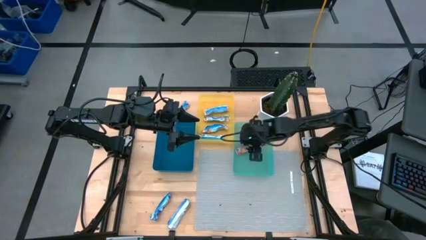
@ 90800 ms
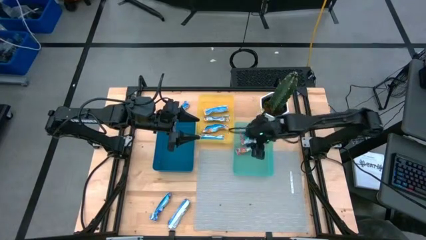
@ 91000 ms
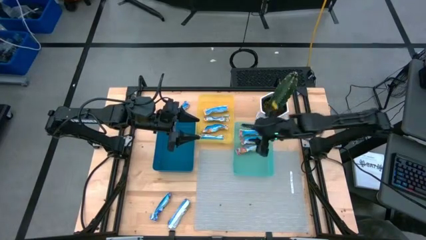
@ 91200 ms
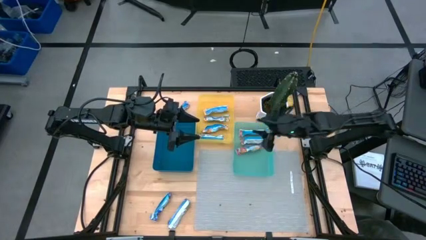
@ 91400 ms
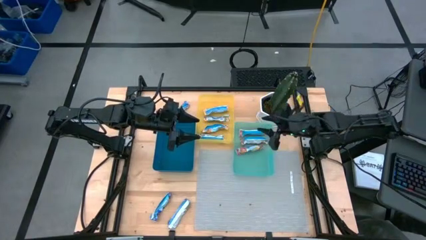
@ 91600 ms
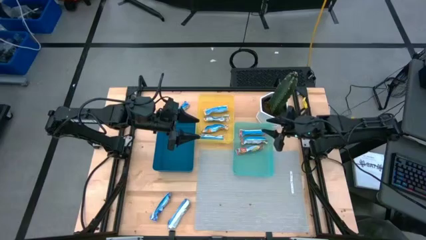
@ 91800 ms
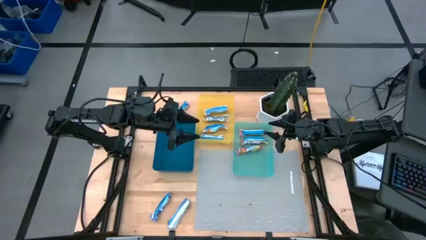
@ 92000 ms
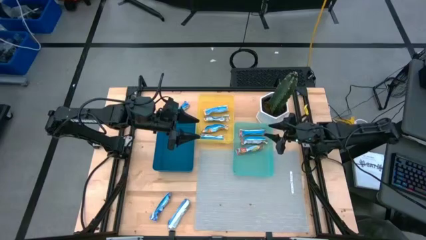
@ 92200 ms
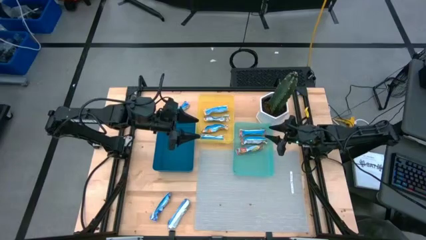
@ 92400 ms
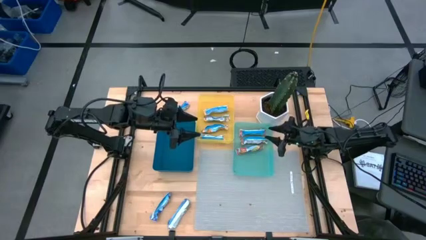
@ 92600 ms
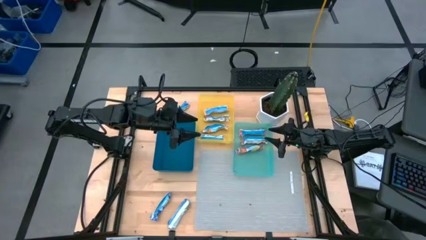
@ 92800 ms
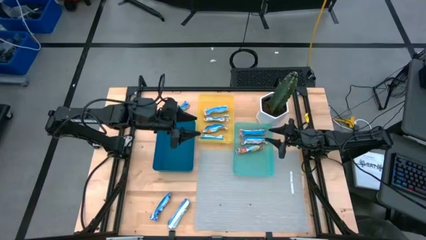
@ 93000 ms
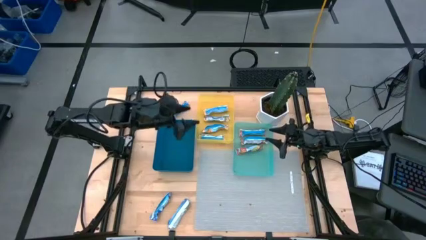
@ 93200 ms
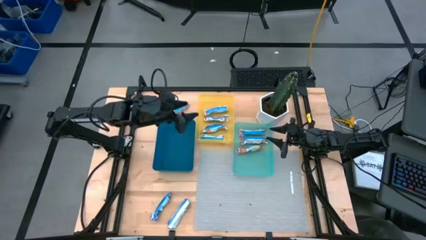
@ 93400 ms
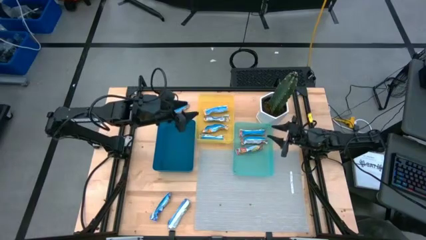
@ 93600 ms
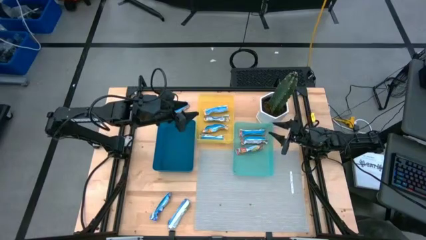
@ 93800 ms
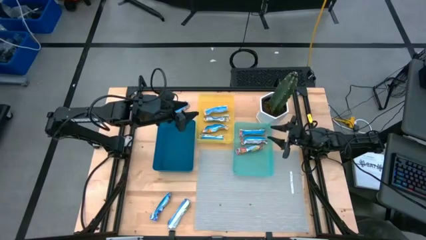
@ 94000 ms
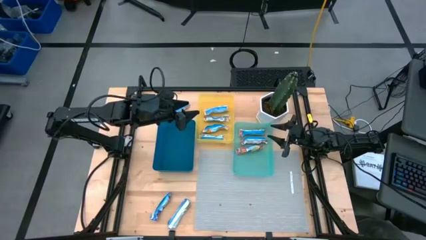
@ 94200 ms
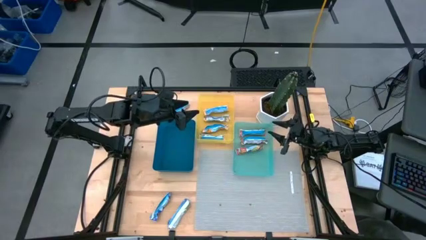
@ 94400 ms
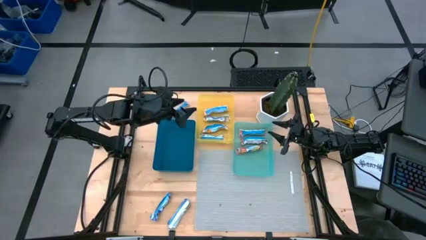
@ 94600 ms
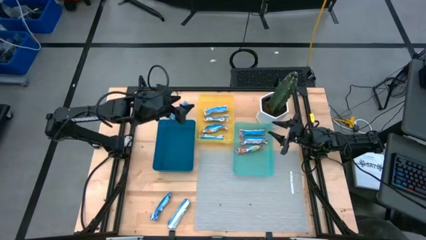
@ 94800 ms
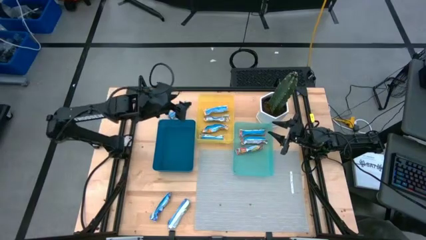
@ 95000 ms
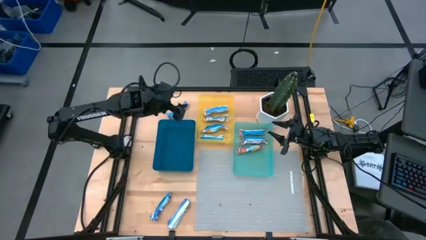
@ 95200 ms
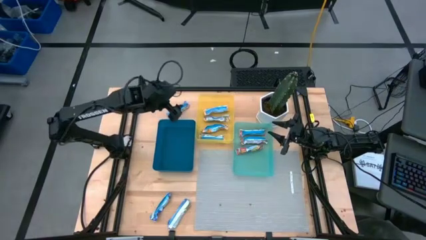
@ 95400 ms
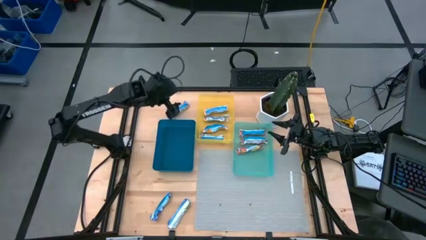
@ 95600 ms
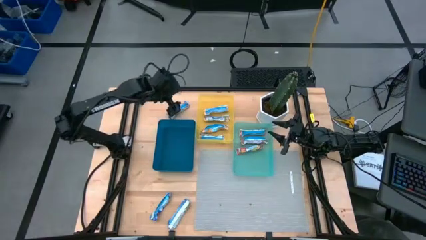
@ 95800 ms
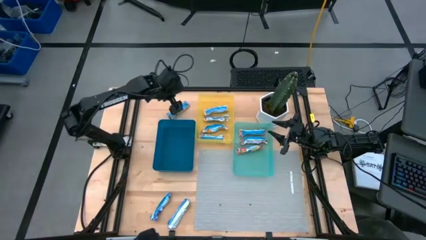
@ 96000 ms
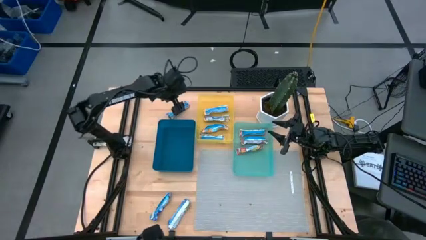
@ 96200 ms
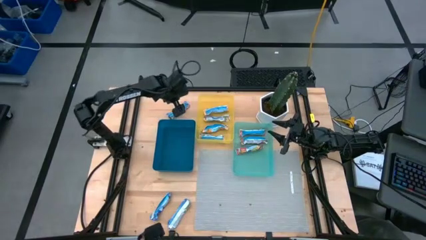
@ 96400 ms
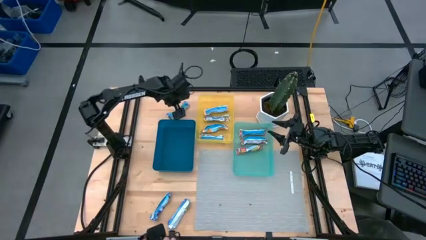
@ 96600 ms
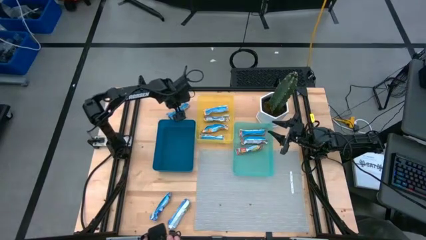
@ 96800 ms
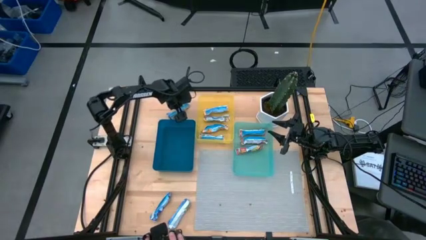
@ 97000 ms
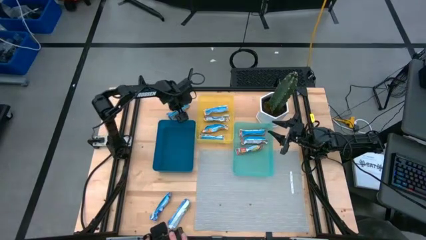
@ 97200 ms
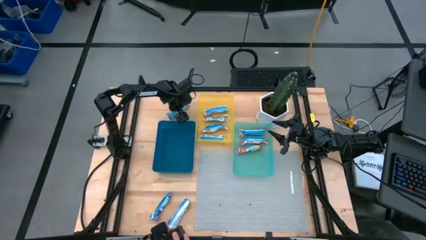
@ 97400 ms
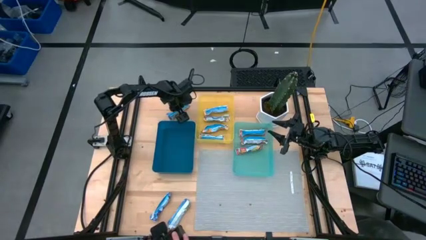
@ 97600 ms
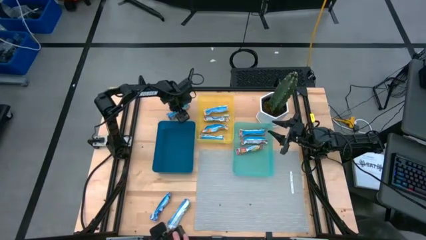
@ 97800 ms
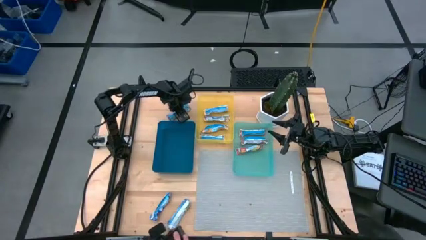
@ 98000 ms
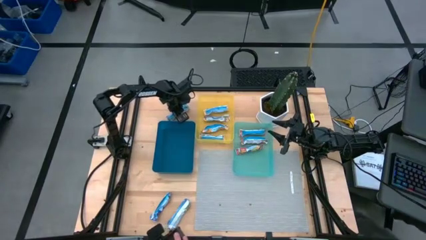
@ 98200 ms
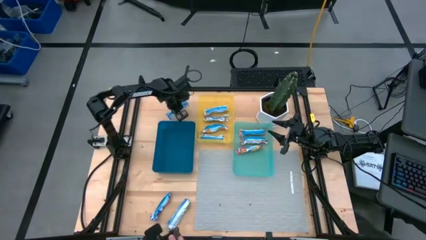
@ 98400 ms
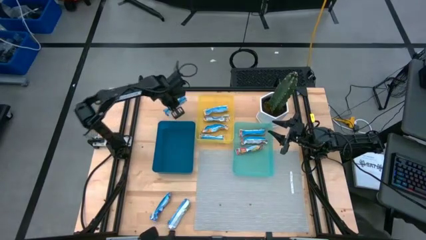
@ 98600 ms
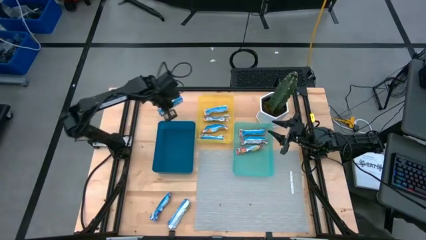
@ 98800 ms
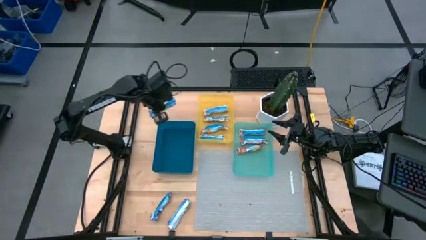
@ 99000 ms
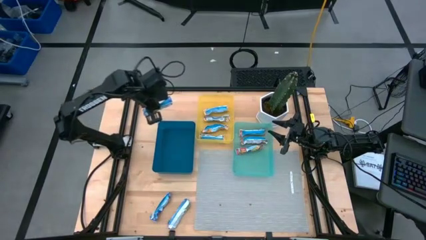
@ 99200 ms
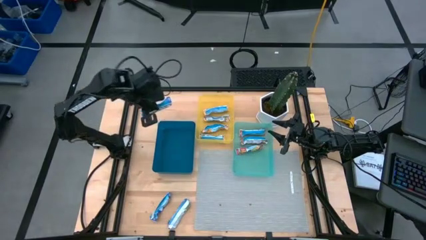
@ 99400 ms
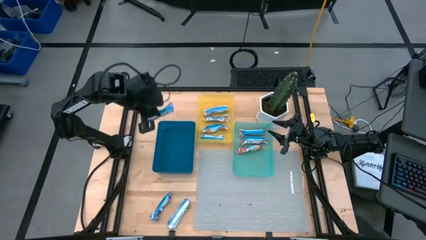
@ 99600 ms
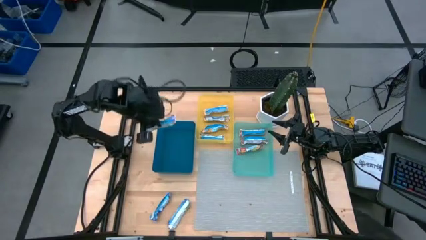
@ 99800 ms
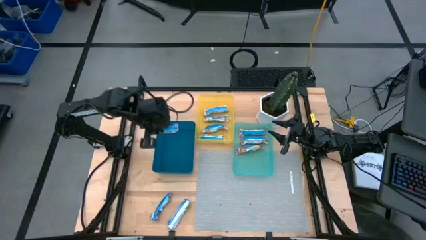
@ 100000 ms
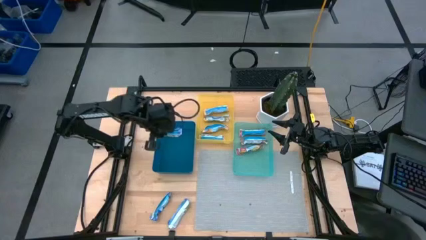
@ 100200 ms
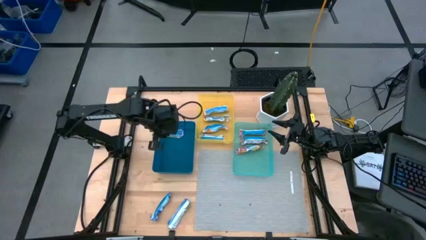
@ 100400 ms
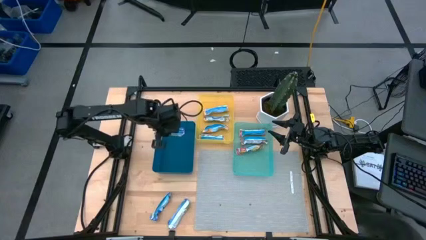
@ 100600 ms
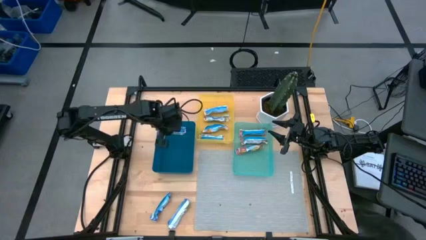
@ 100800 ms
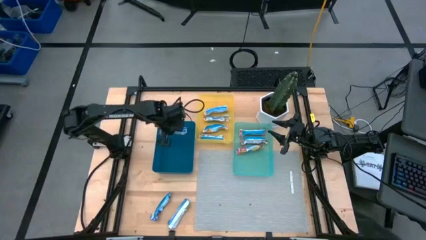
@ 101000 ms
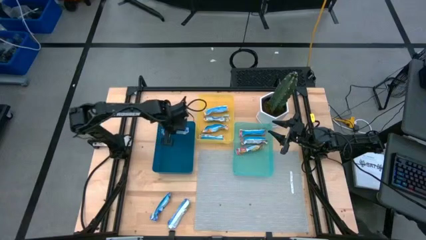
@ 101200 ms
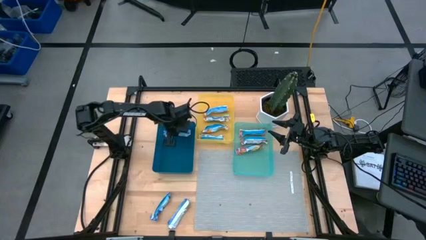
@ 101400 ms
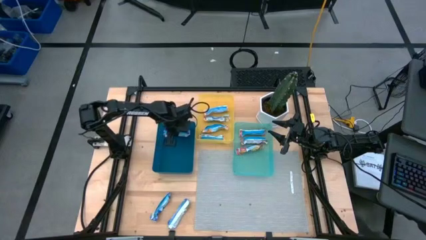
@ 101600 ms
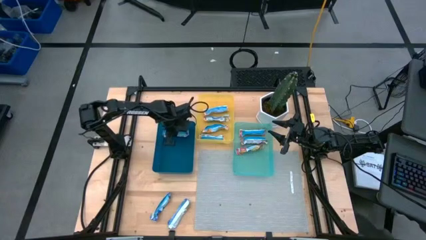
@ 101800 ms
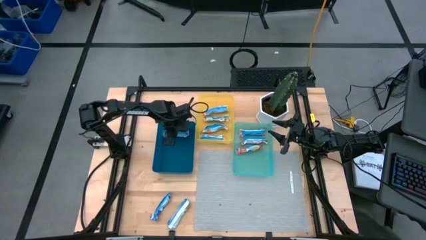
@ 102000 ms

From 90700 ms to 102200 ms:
Task: Pick and place Granola Bars by type
Put the blue granola bar into the blue bin

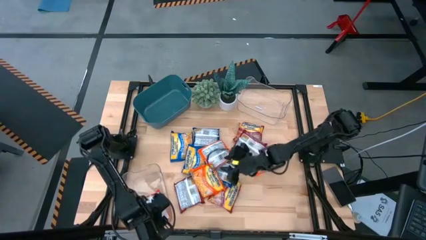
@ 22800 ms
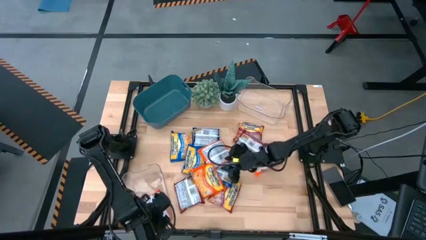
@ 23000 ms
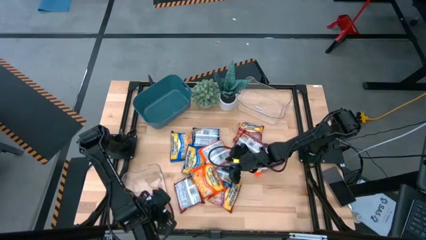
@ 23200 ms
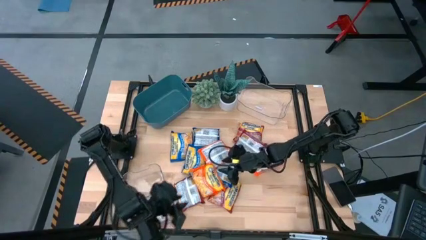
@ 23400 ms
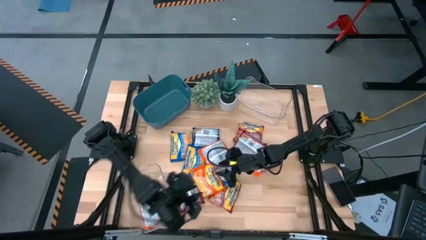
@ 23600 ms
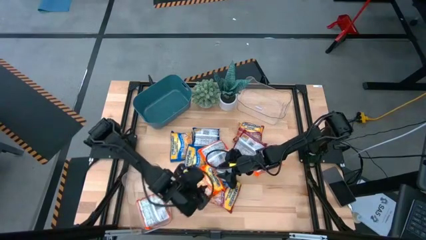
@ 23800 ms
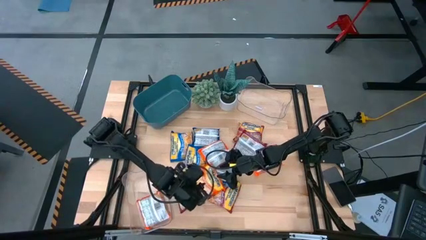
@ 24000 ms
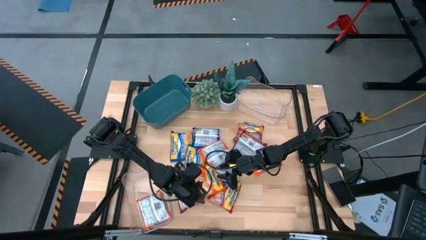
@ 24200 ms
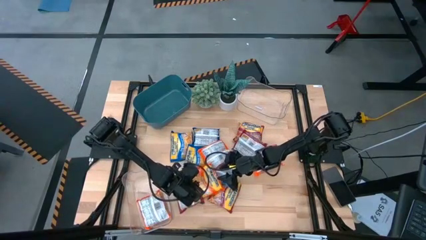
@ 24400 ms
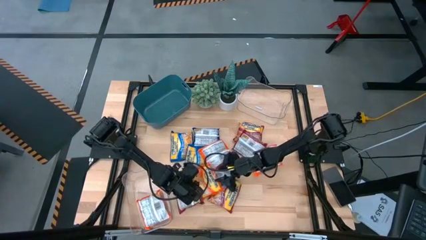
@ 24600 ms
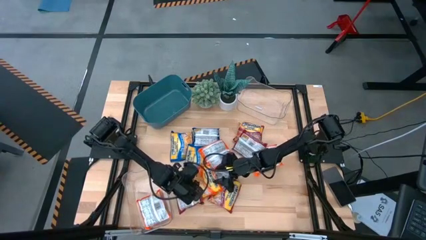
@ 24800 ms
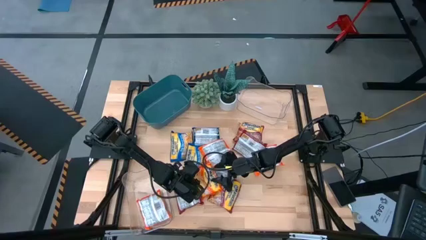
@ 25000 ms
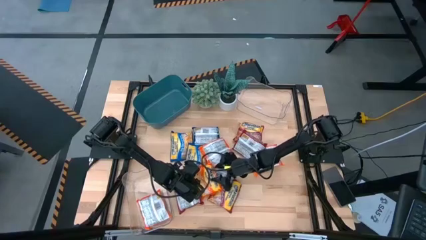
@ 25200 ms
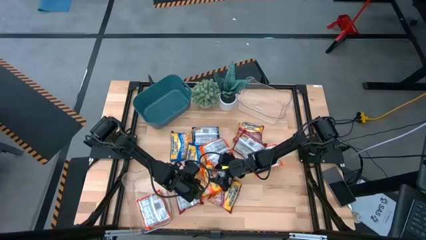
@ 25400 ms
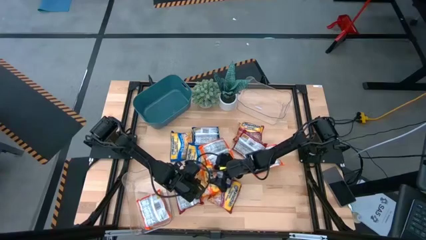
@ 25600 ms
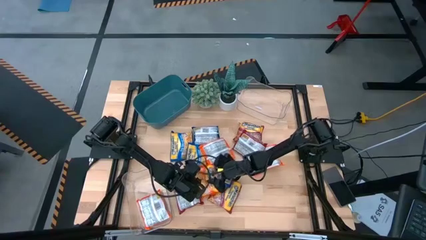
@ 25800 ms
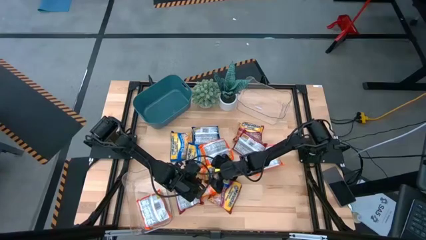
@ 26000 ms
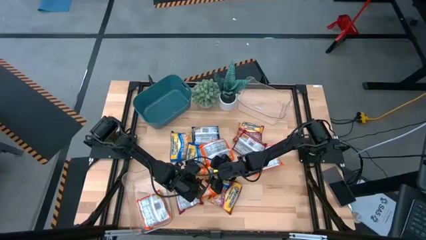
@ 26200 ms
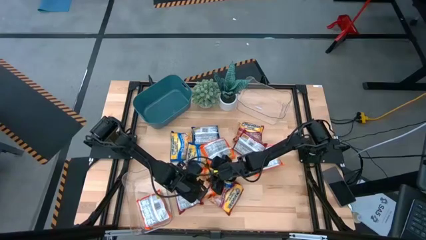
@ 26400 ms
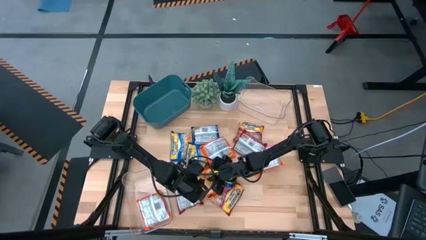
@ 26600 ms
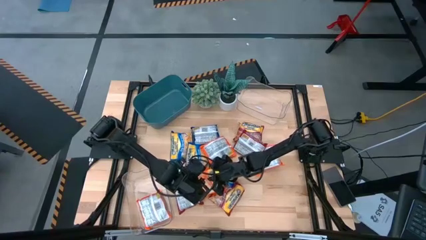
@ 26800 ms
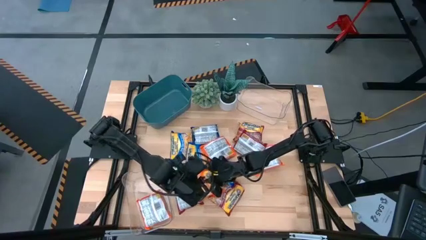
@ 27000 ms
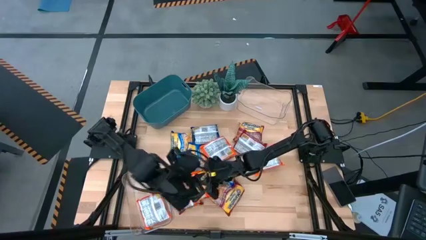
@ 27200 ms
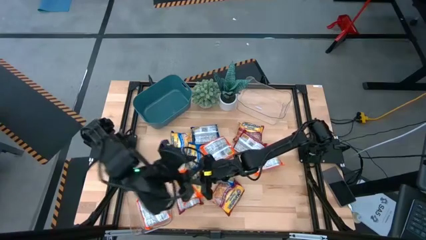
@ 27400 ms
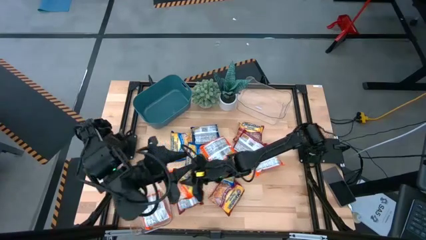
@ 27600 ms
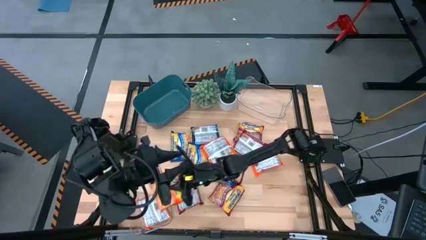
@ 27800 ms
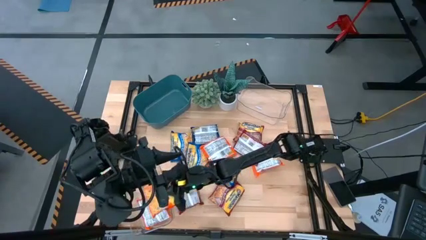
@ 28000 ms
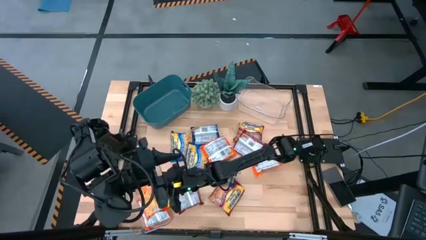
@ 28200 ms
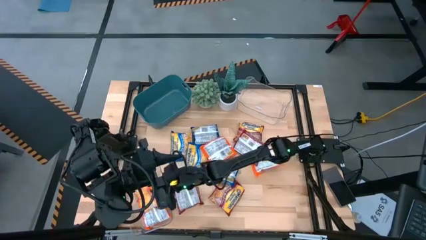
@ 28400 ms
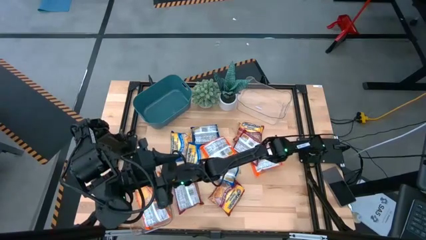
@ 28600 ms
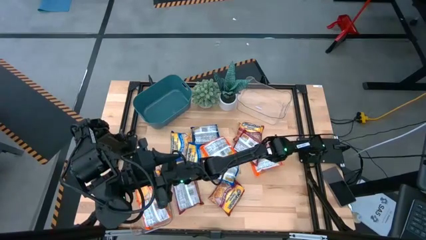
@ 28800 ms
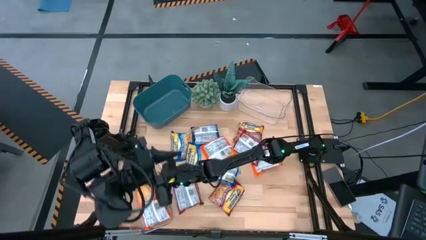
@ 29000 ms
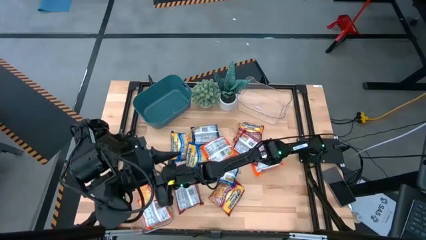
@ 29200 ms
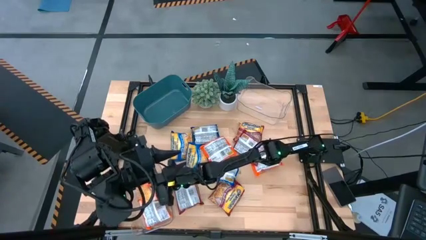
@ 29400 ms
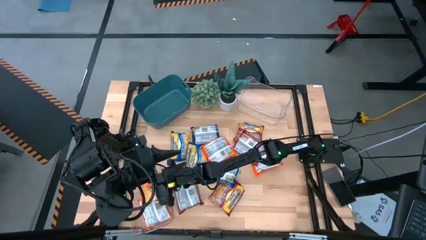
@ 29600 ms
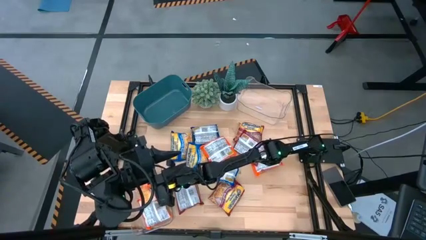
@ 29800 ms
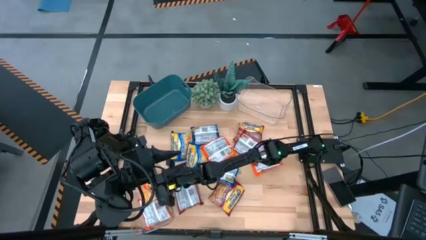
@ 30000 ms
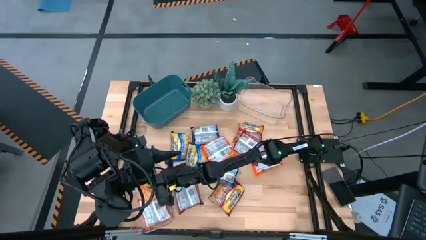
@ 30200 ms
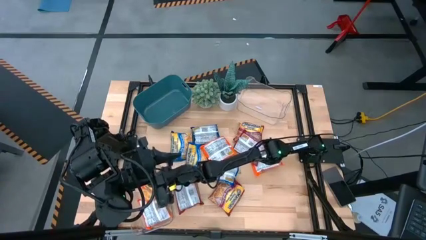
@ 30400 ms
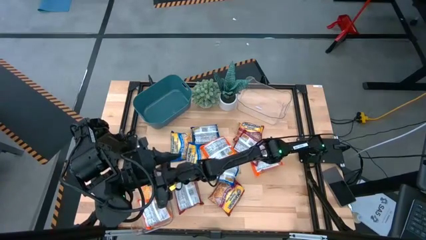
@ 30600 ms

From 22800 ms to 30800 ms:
Task: Sort Maruchan noodles
Put the orange noodle pack into the bottom transparent bin
